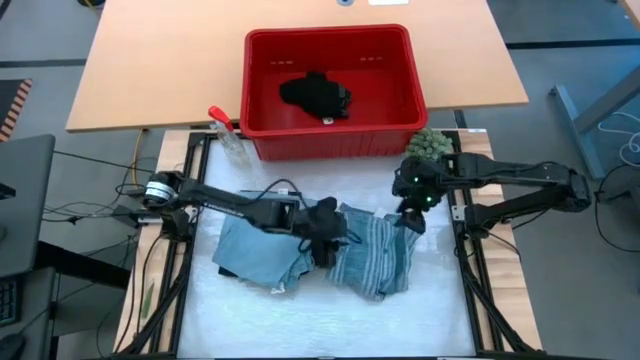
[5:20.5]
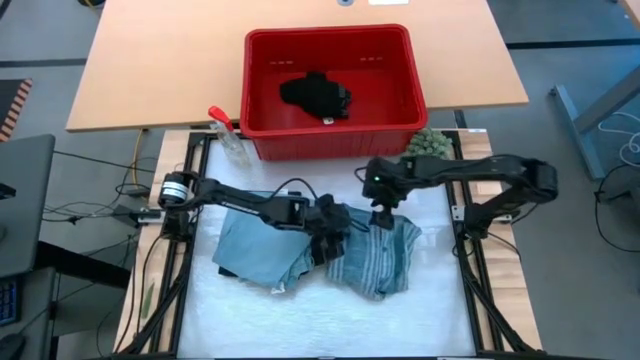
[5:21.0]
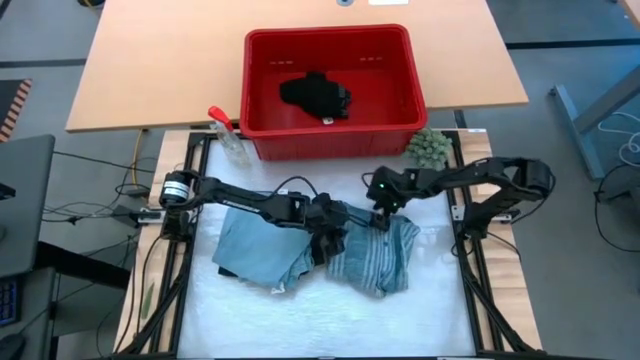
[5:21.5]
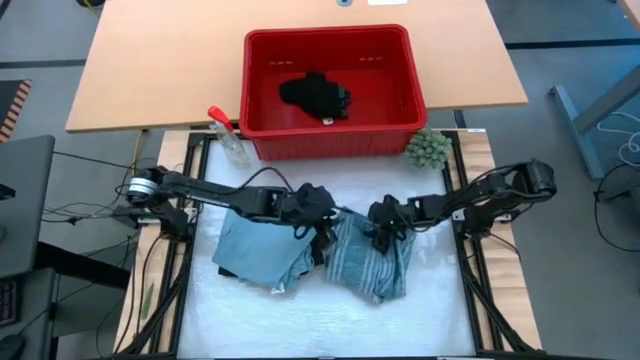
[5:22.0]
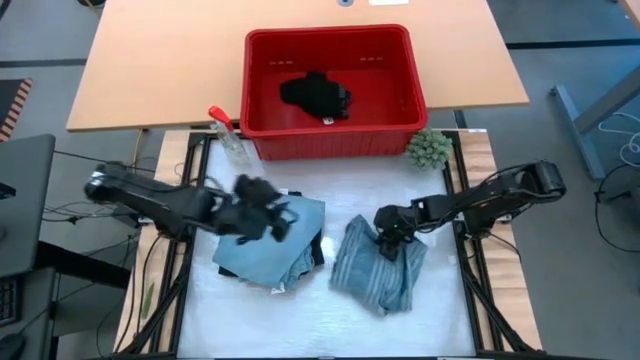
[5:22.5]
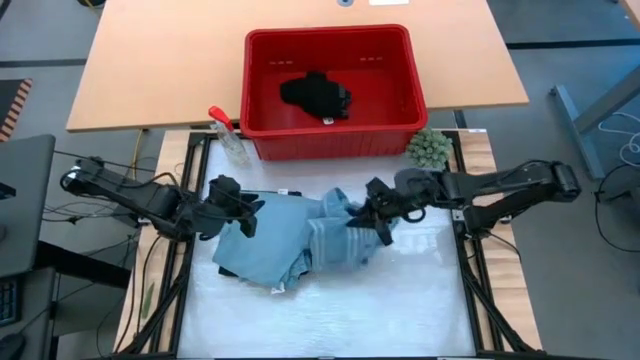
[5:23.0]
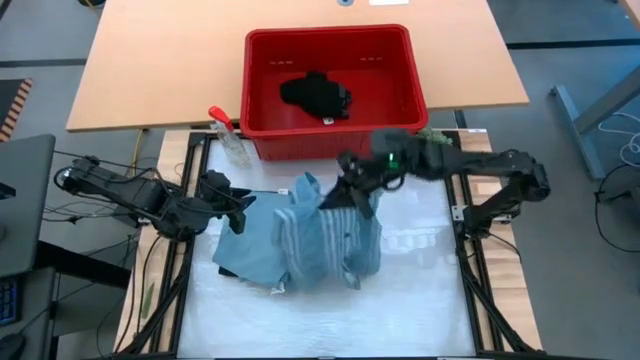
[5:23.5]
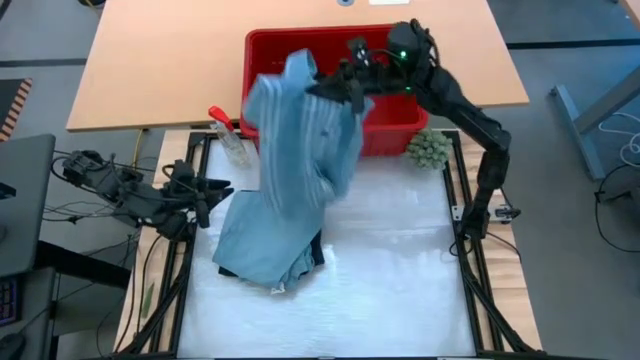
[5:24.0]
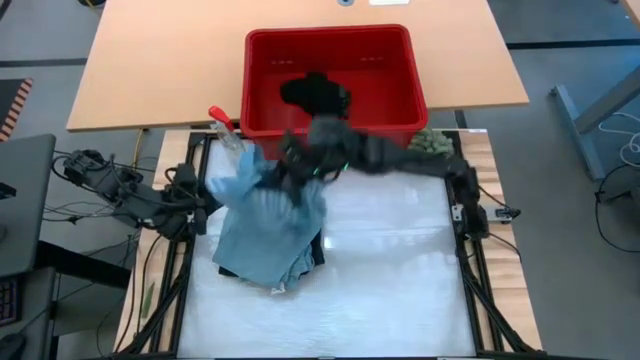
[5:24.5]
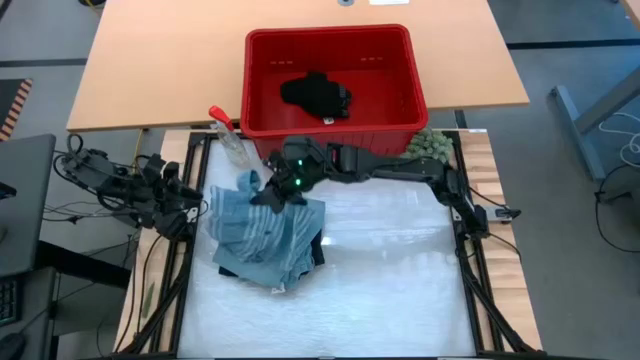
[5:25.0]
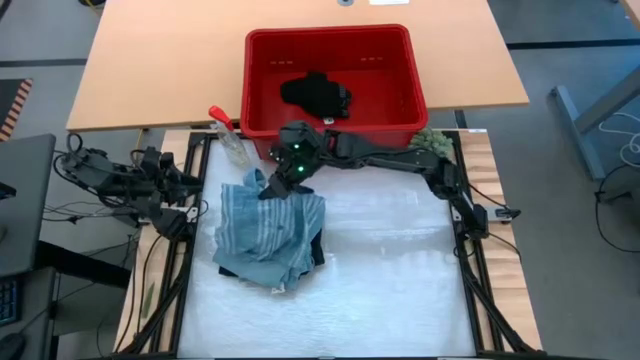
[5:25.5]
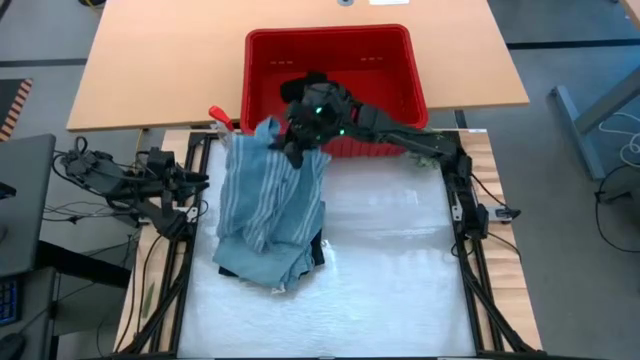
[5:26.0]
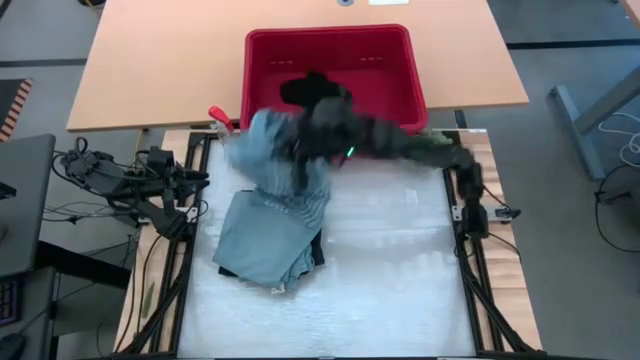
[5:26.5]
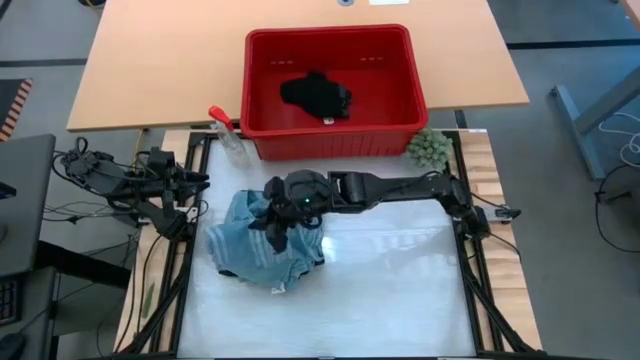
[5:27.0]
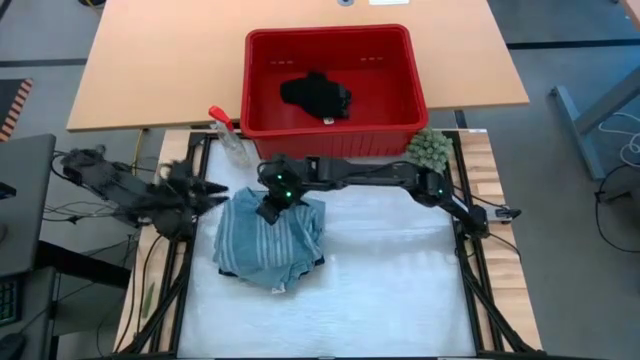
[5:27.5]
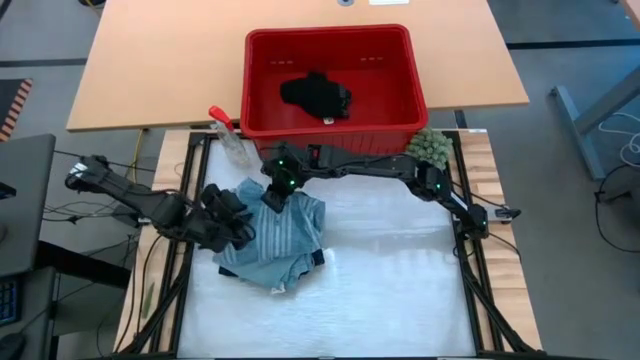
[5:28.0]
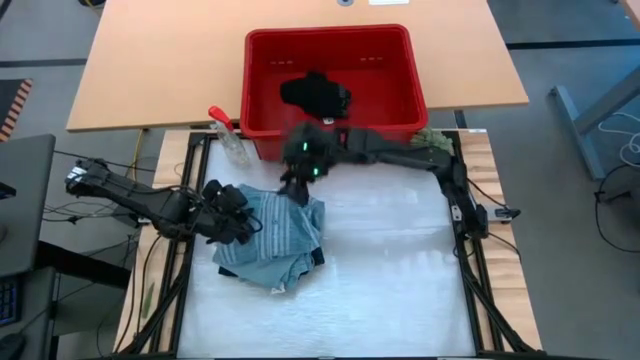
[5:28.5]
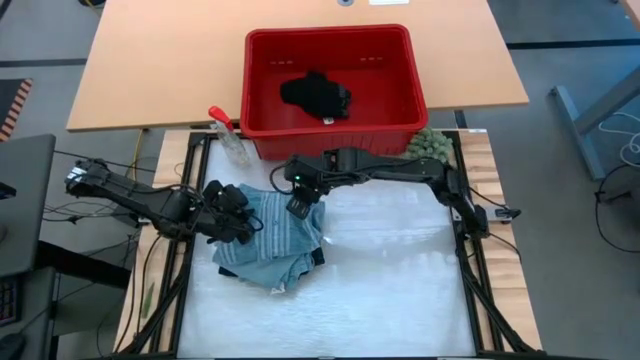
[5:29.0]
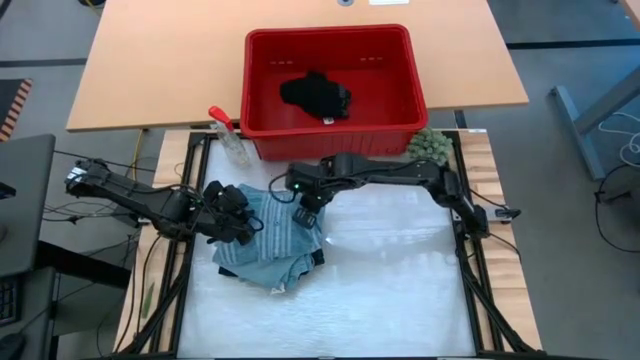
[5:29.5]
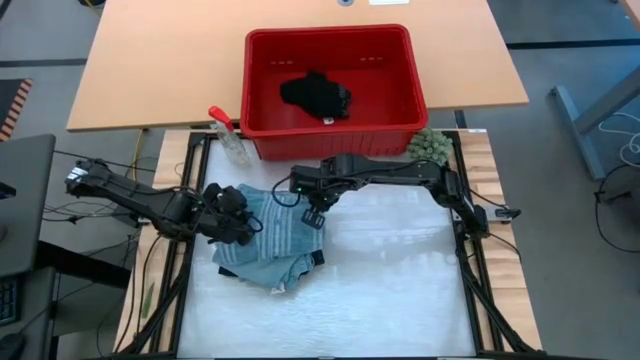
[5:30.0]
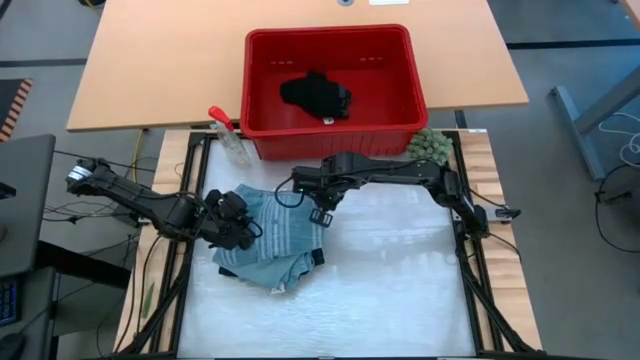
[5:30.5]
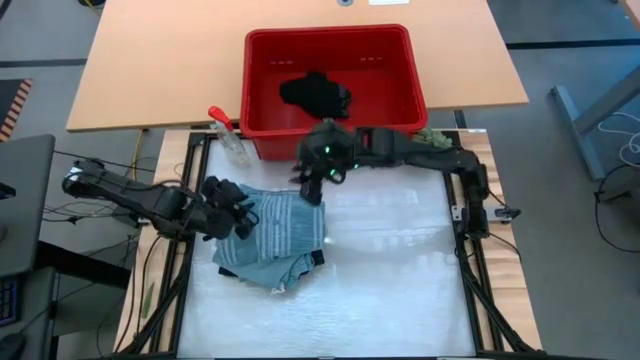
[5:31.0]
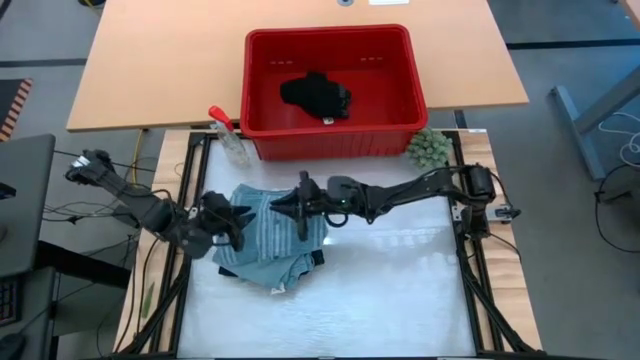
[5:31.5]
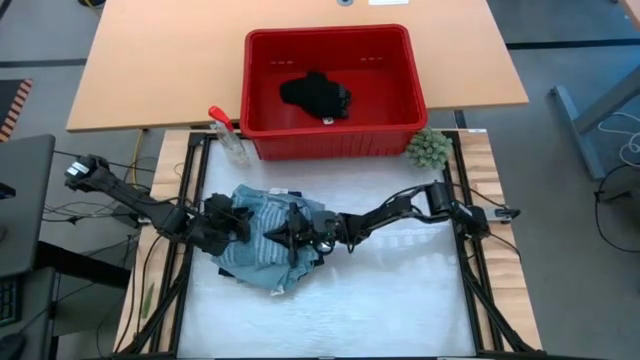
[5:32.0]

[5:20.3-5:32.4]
Task: Fold Laundry from Bin
Stack the light blue polo shirt on top of the light blue pants

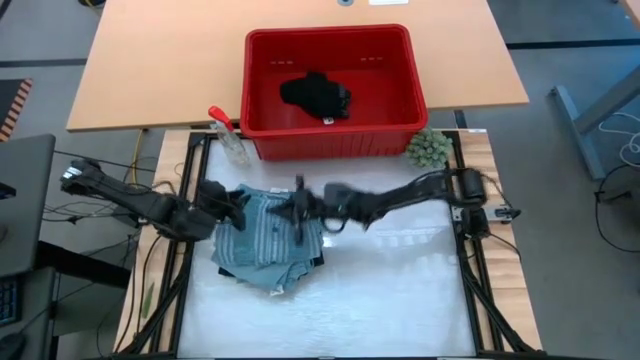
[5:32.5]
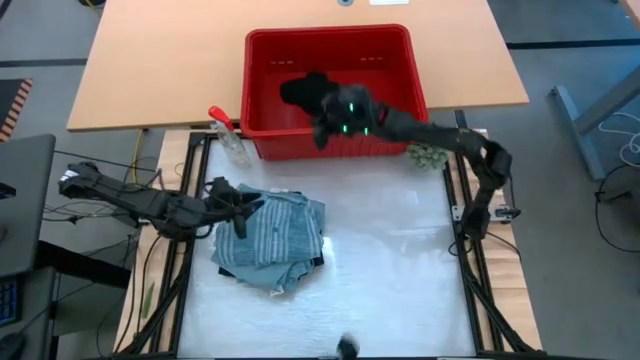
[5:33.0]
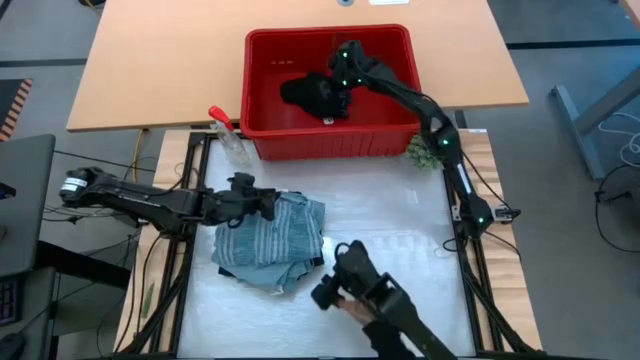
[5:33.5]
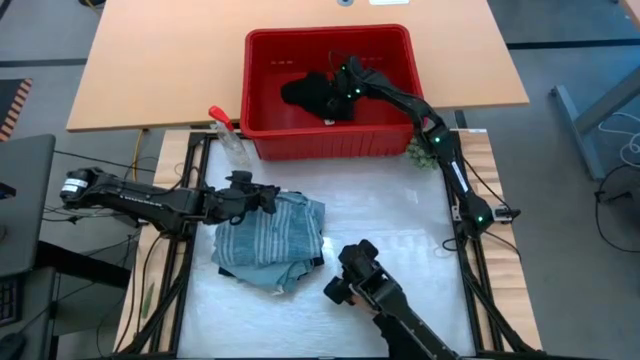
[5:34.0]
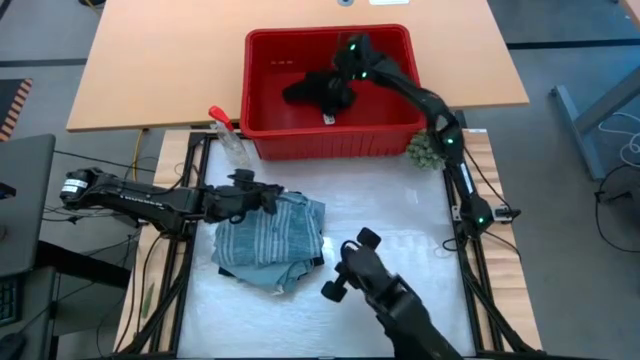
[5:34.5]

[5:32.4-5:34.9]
Fold the black underwear

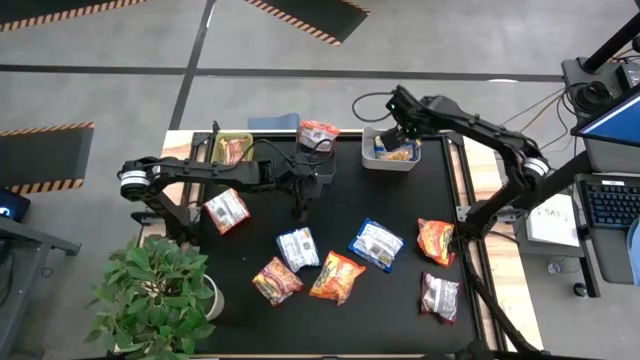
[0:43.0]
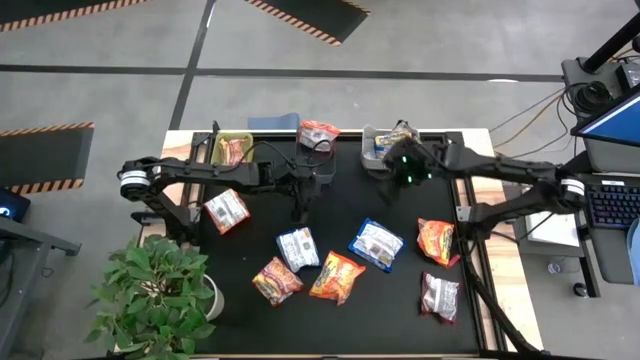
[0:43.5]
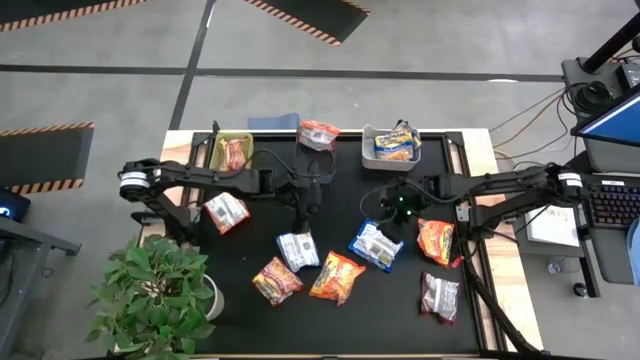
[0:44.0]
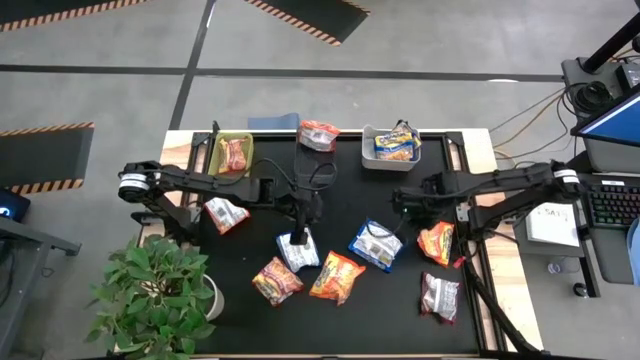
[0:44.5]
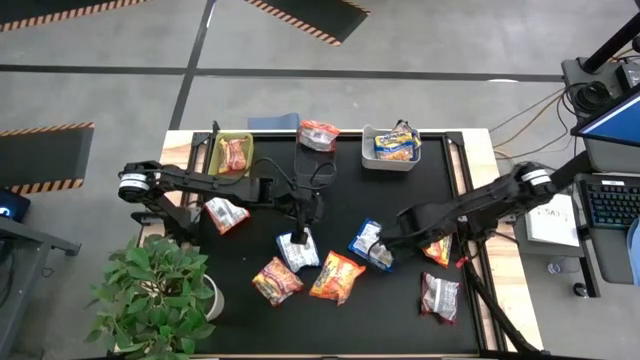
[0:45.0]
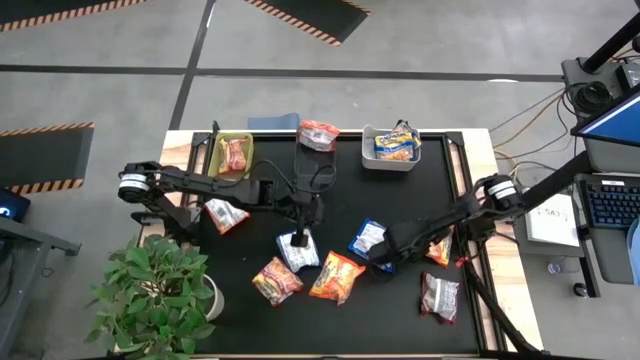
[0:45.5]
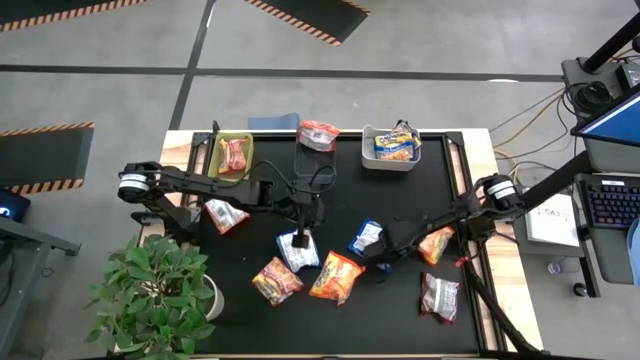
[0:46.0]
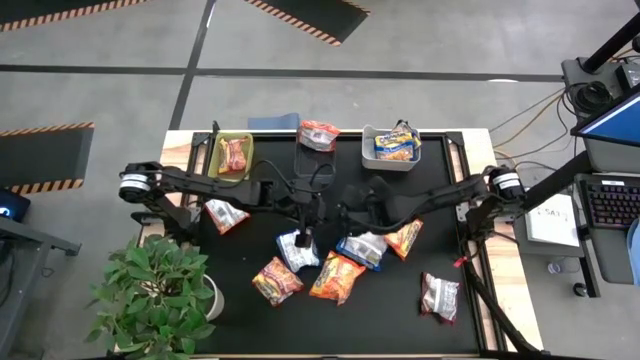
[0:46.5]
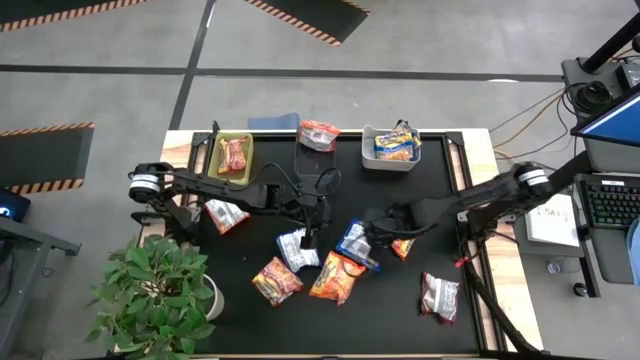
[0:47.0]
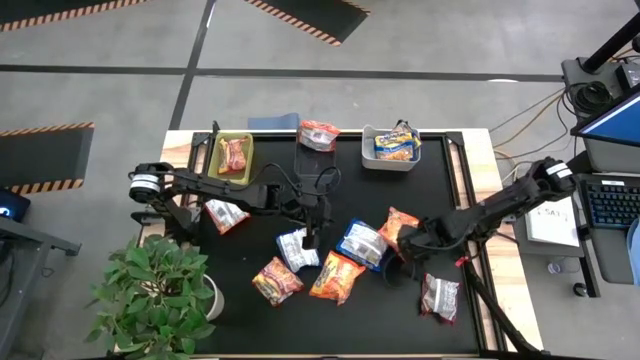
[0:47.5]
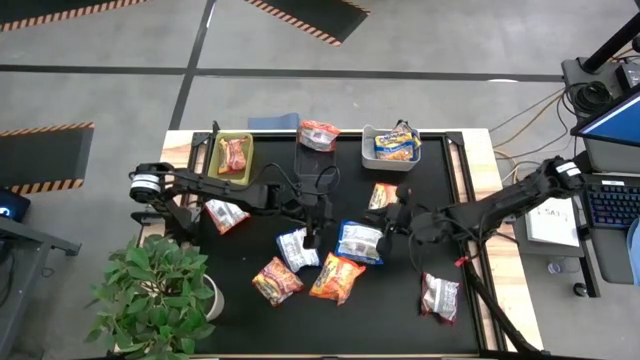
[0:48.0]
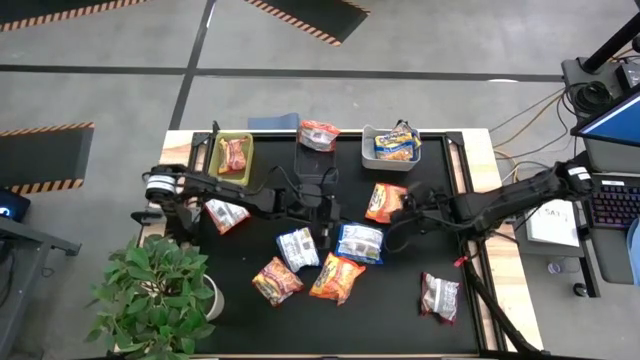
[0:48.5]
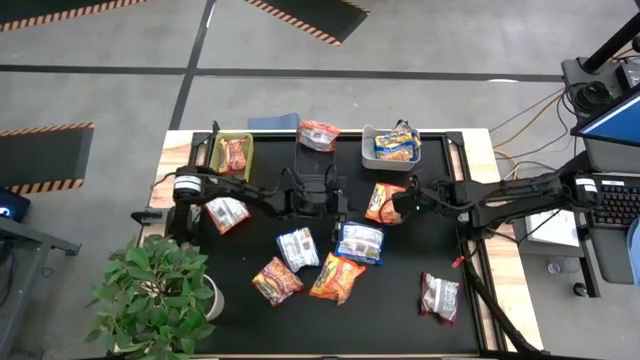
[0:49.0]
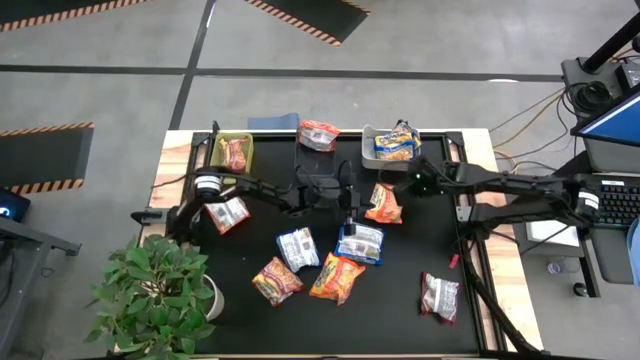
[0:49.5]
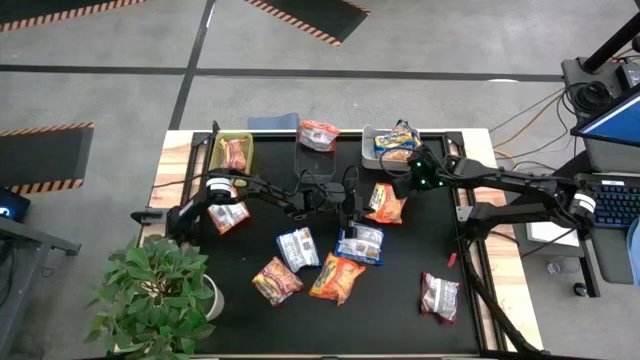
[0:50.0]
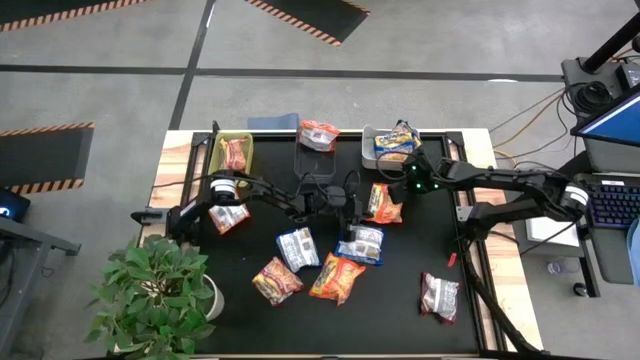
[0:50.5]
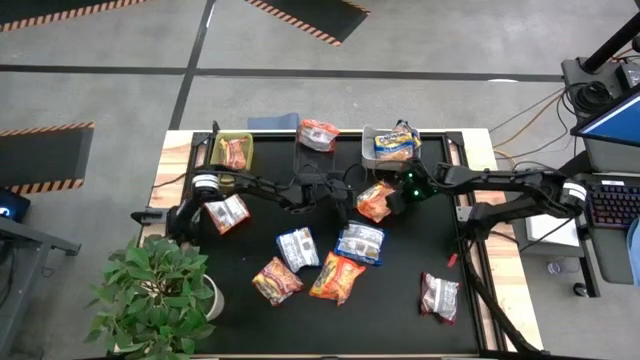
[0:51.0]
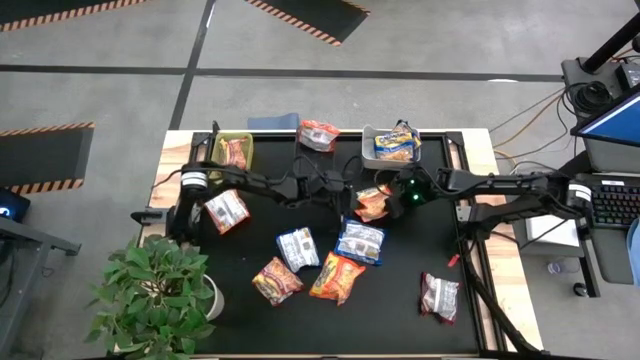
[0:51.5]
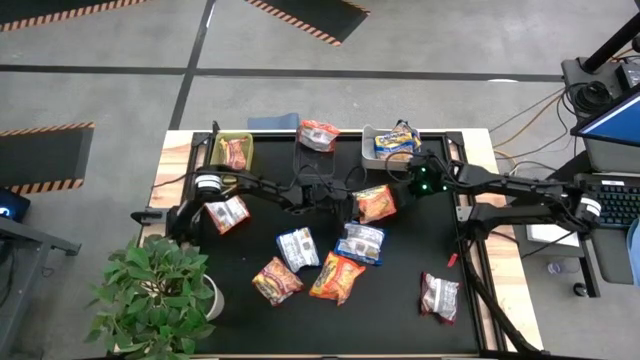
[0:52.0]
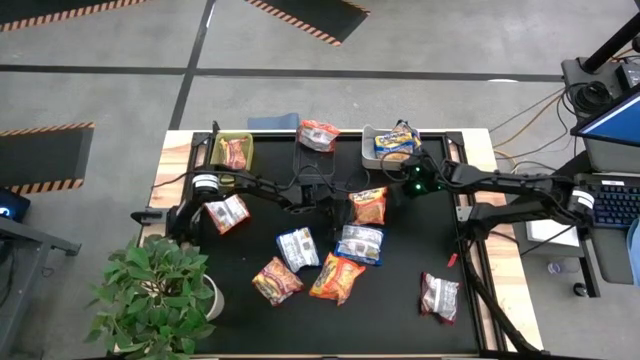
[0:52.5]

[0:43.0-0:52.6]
Task: Sort Maruchan noodles
Put the orange noodle pack into the black bin
